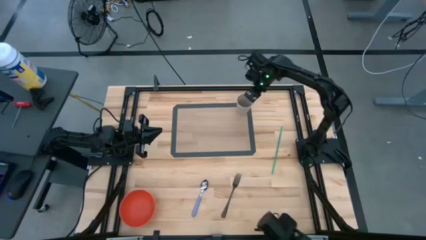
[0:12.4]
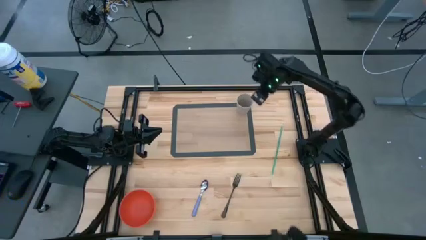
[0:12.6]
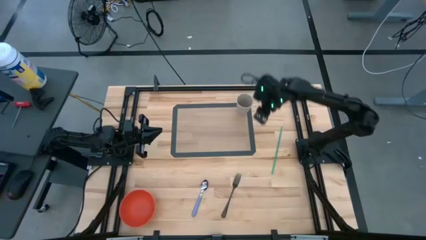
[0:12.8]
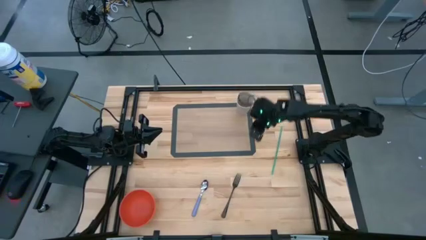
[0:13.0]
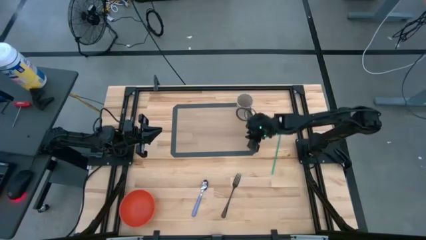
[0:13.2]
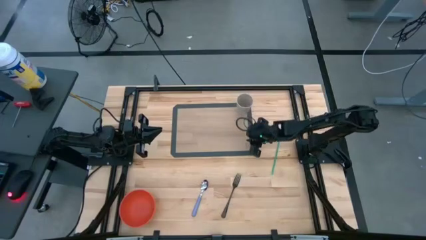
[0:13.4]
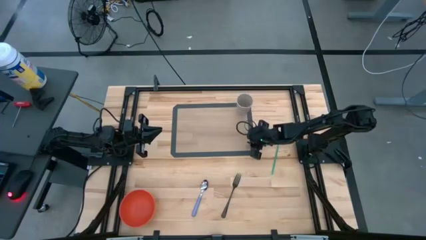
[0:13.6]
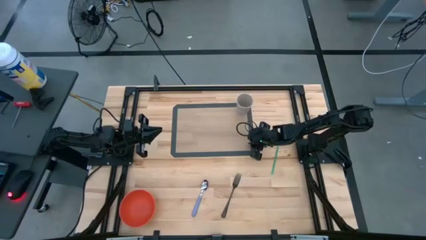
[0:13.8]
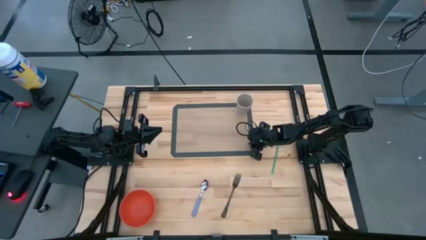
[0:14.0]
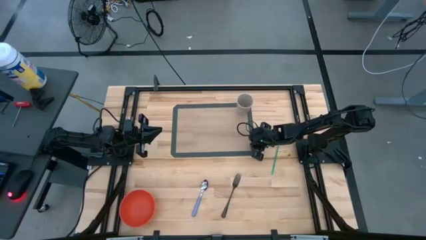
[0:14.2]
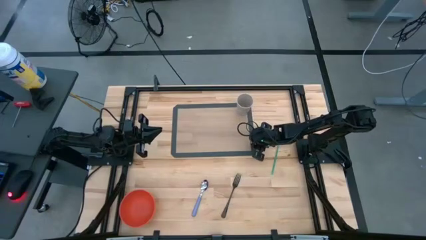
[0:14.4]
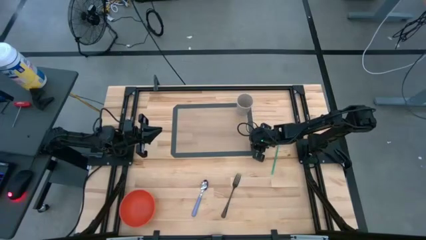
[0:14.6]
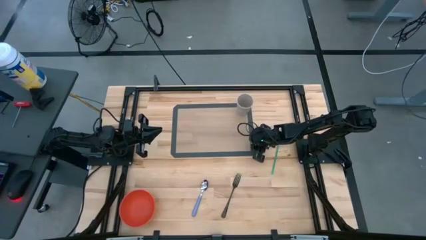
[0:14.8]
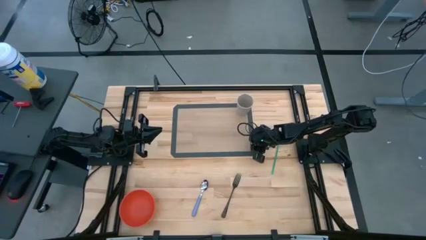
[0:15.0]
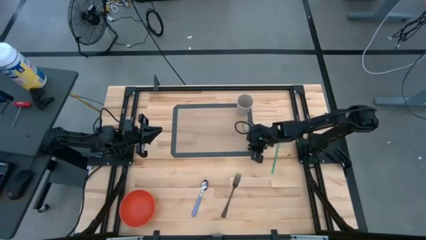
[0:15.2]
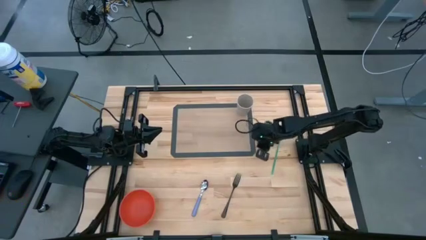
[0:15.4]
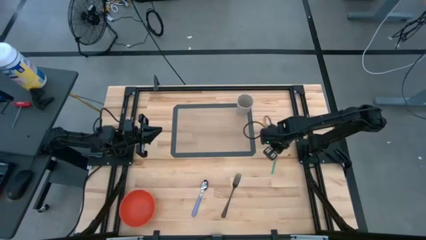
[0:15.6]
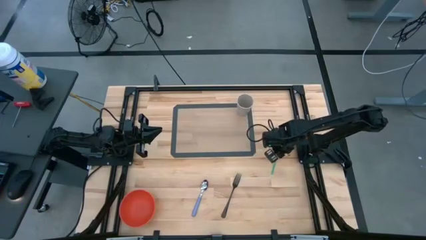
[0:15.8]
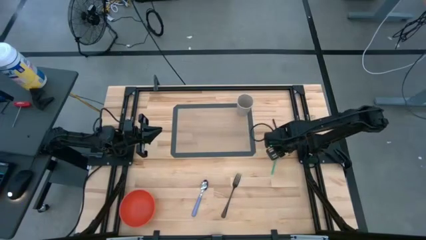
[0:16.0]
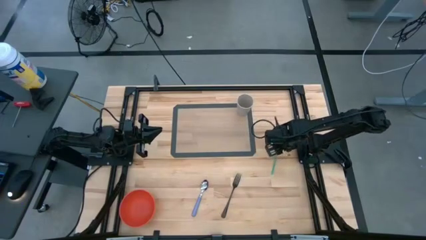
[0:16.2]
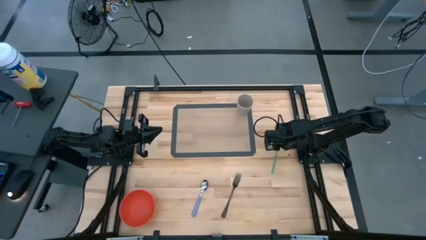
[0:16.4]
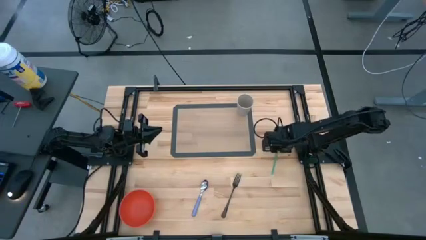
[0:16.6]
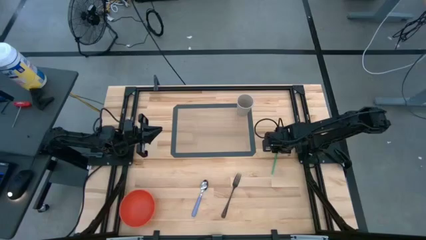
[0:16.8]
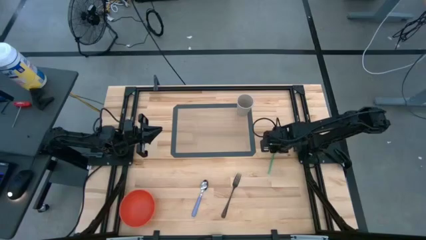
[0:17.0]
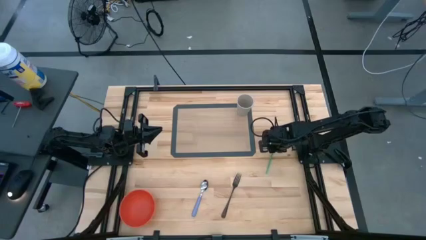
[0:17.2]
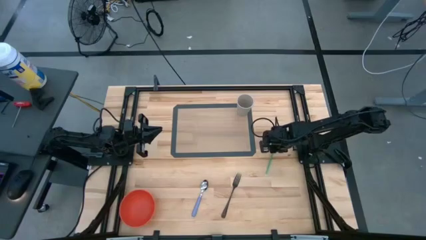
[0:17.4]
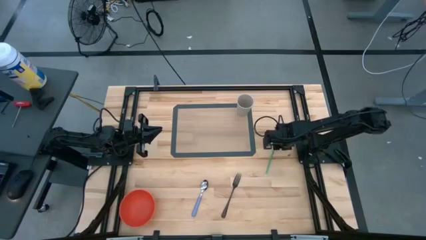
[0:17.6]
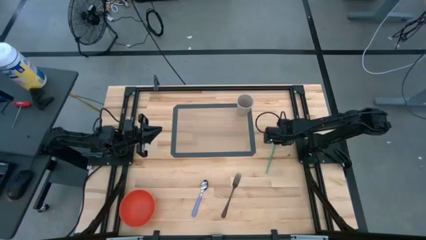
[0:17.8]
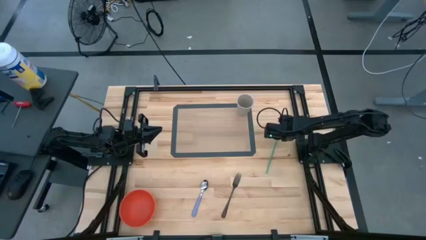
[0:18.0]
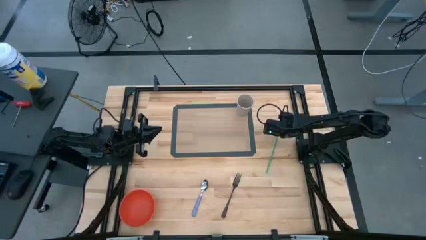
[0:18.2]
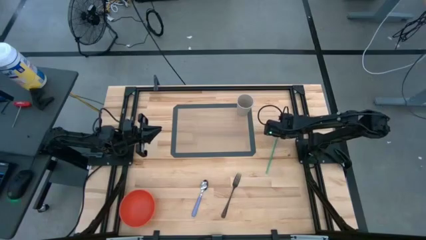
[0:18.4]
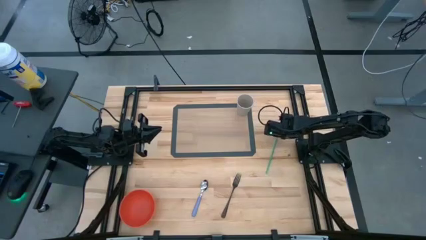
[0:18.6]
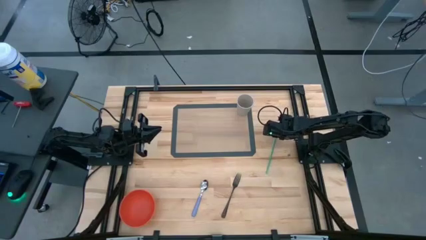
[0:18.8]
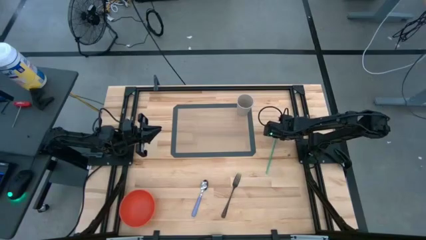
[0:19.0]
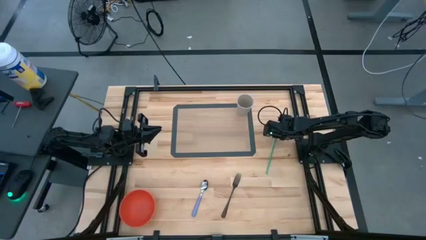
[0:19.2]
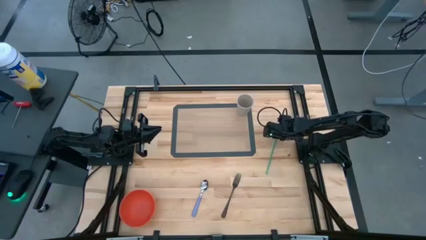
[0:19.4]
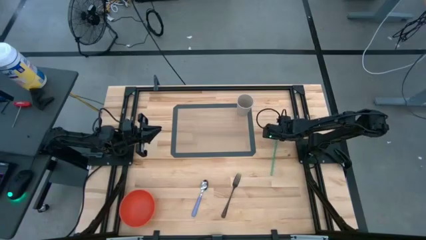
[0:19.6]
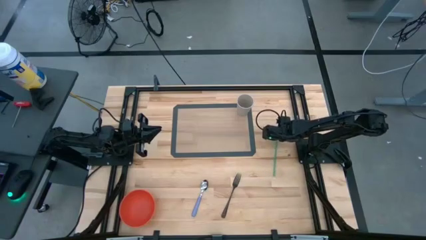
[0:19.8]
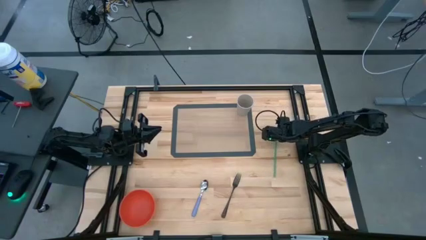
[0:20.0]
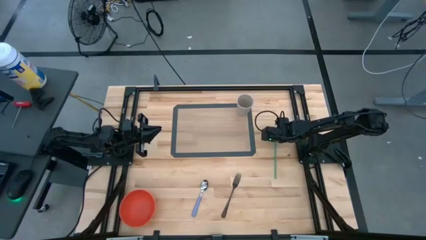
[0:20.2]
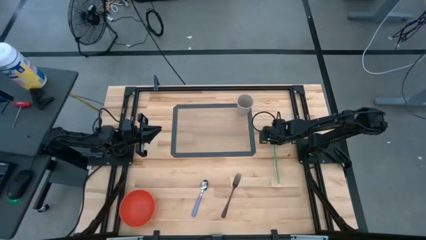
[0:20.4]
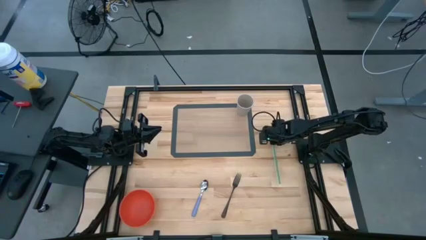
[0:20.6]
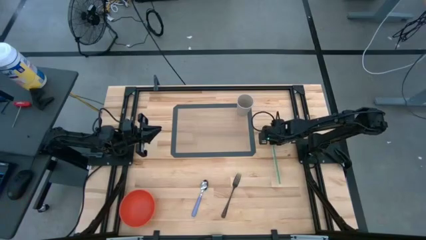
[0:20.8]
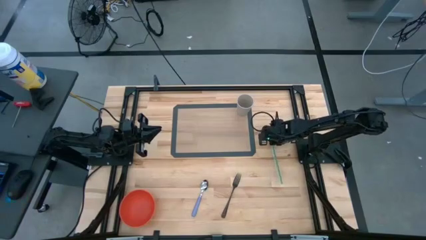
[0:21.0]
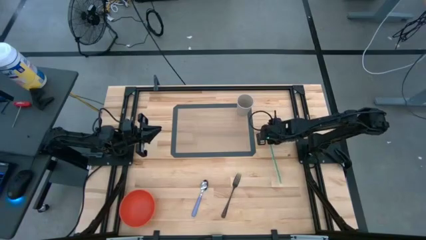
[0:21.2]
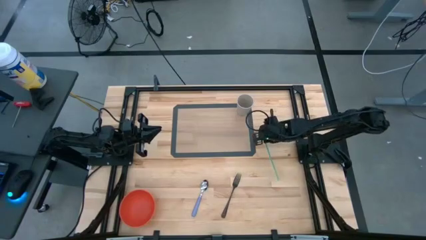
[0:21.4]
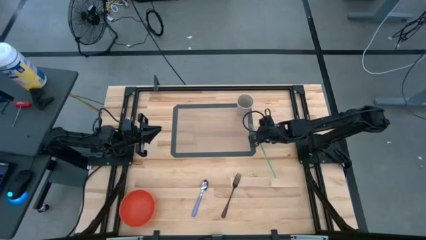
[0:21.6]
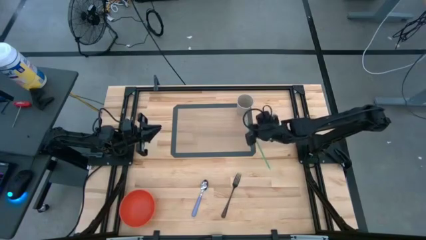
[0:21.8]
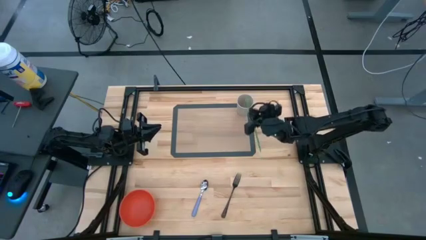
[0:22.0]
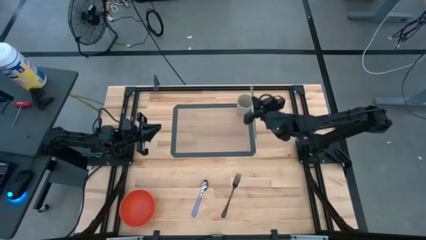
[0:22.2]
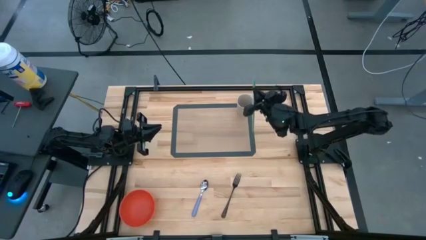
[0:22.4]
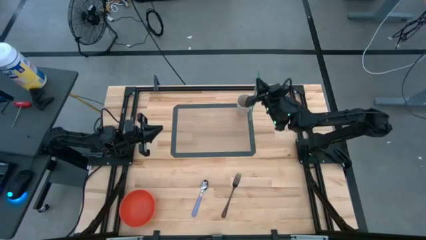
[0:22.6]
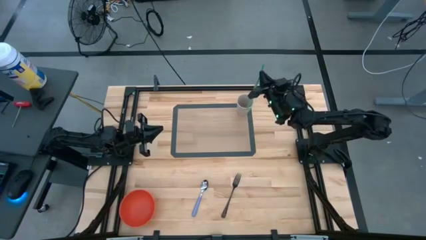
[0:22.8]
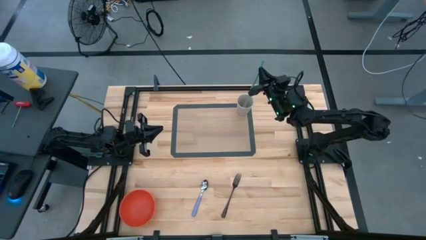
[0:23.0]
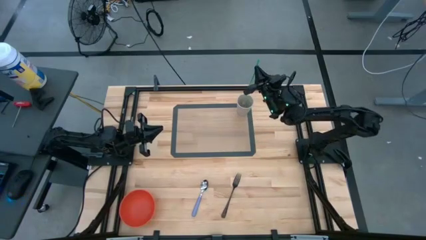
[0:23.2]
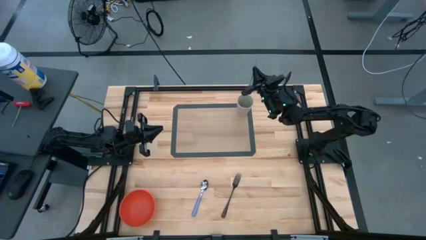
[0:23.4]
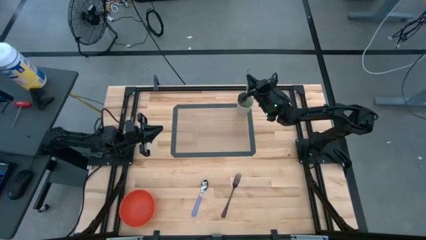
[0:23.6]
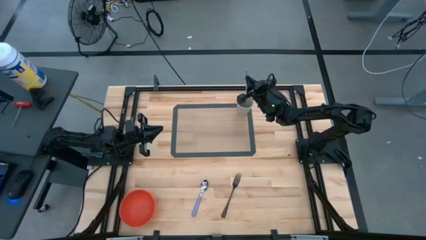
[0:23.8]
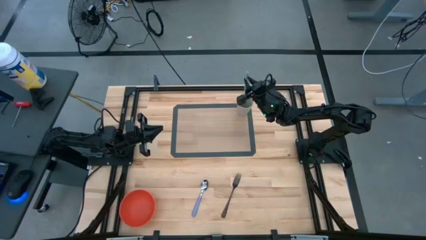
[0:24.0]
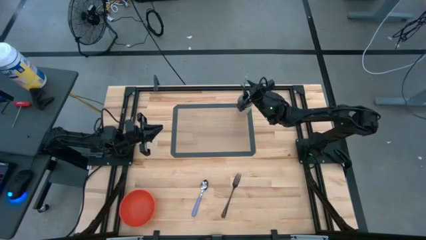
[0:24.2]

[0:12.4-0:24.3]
Task: Pick & Place Utensil
Put the green straw into the white cup

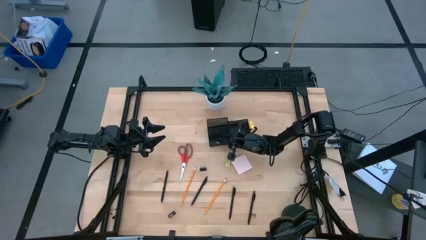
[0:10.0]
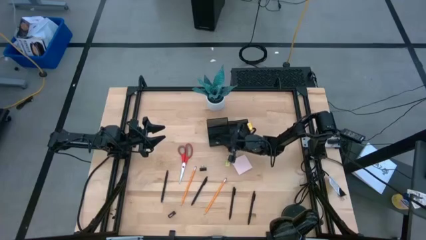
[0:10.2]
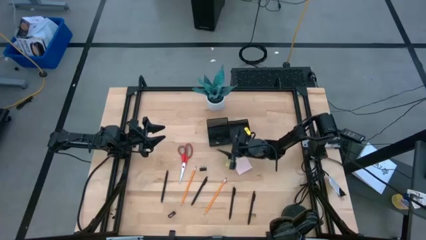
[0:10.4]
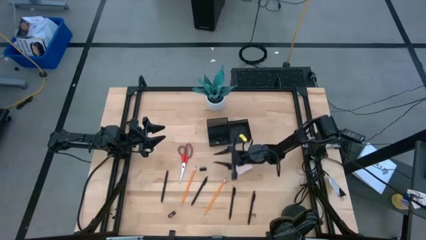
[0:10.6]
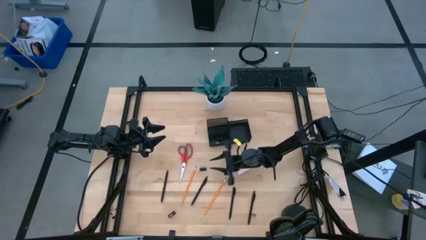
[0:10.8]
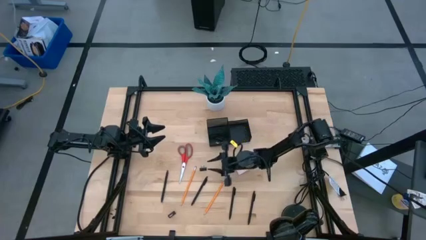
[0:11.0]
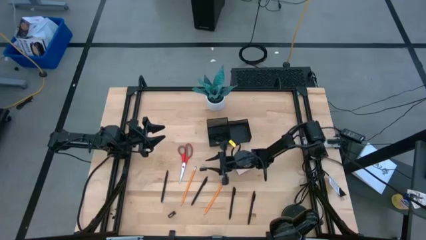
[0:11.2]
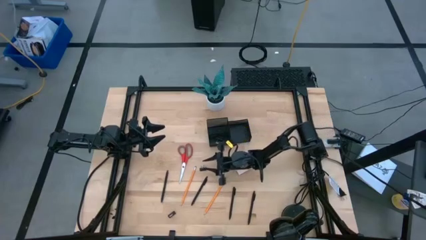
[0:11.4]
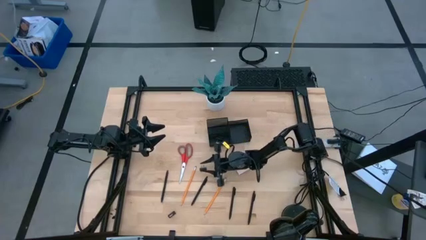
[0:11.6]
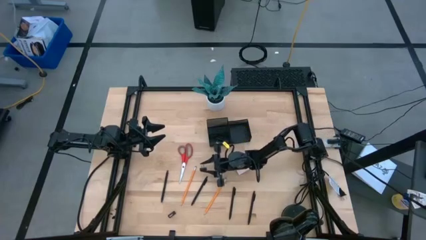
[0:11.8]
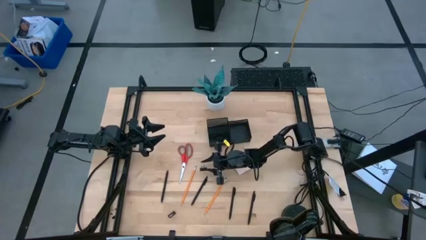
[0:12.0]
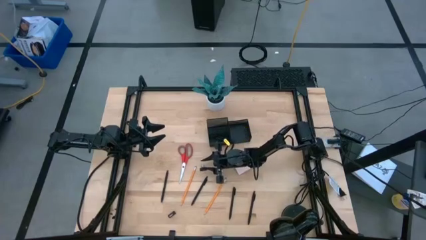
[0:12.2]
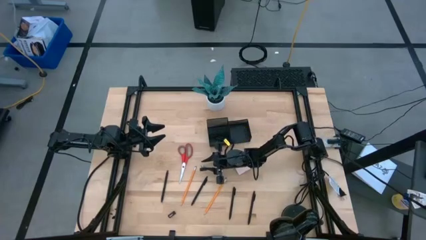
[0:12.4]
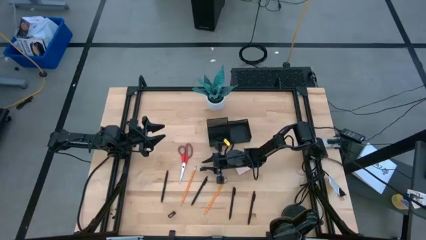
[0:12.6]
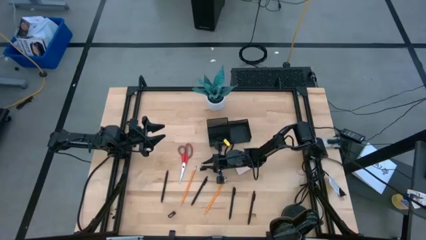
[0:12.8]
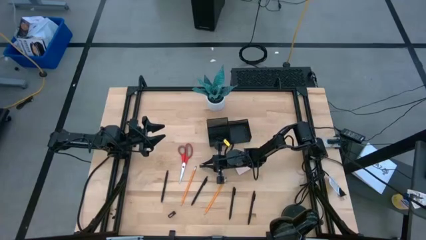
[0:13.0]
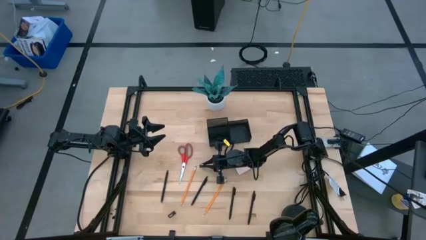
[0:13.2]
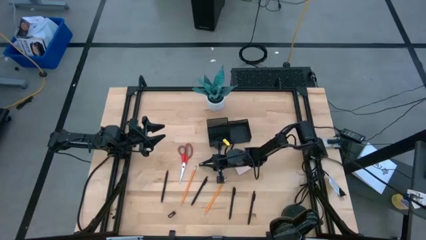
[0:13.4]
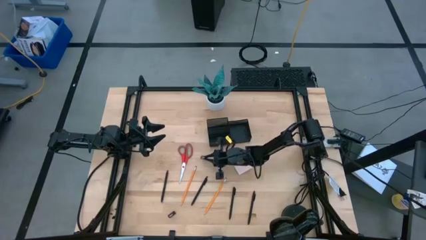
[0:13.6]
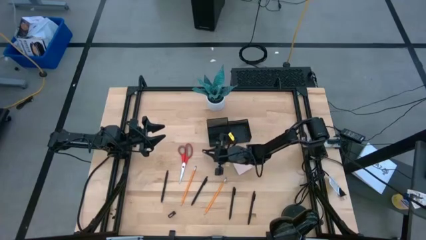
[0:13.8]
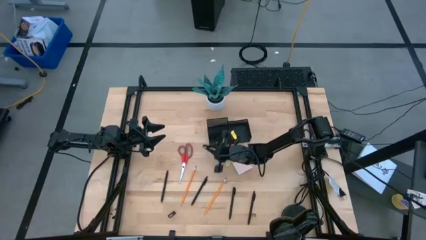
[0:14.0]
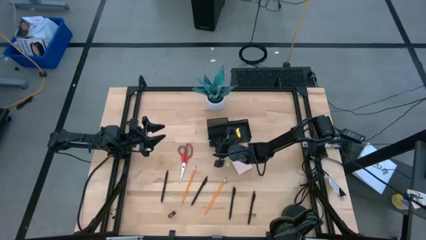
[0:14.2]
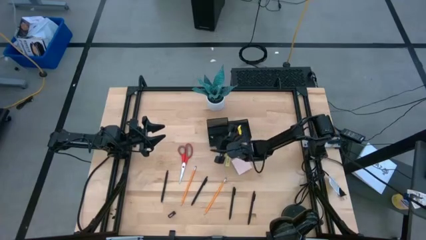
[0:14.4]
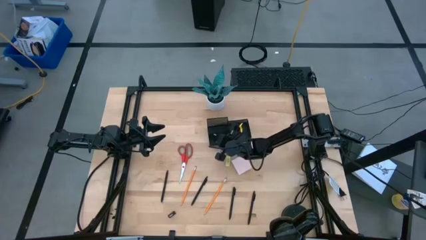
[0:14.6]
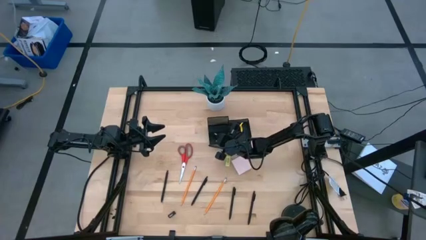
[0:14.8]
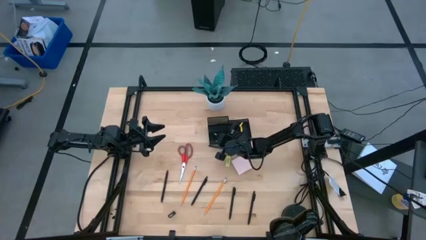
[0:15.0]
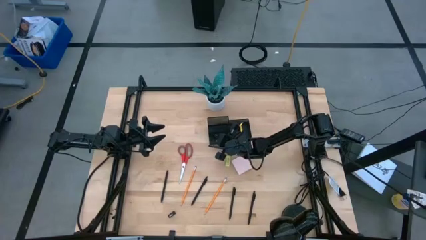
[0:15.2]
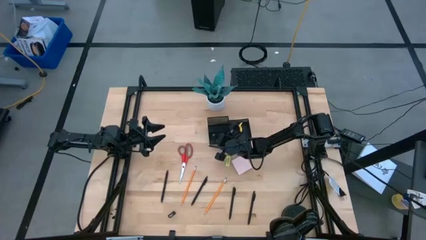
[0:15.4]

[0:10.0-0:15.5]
Task: Pick and place office supplies into organizer
Put the black binder clip into the black desk organizer
